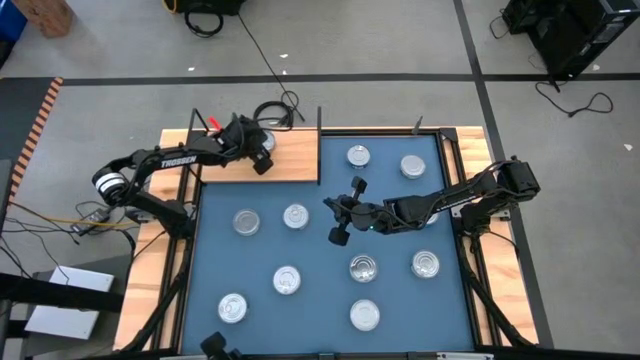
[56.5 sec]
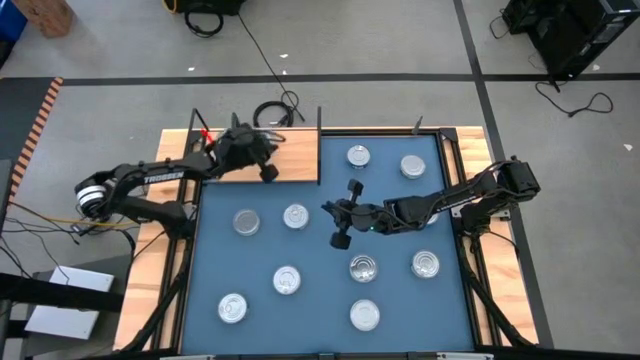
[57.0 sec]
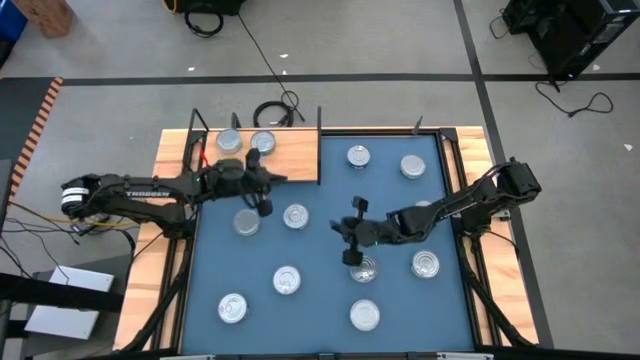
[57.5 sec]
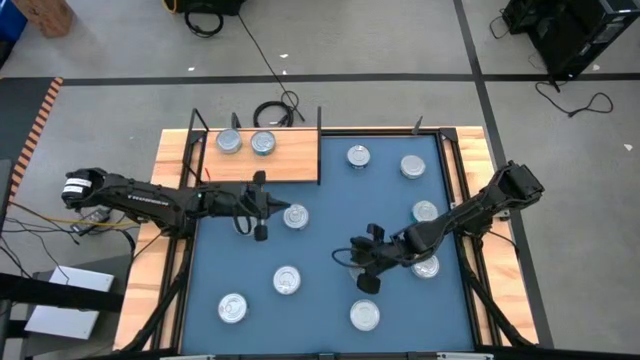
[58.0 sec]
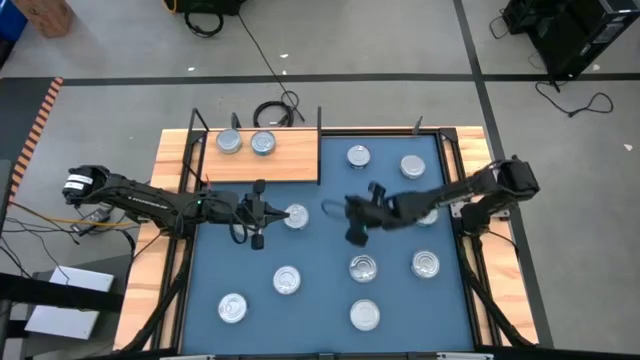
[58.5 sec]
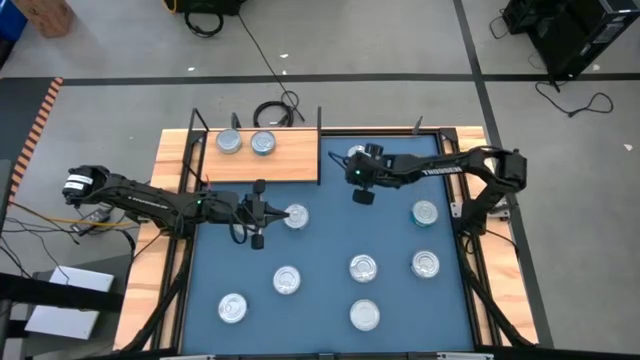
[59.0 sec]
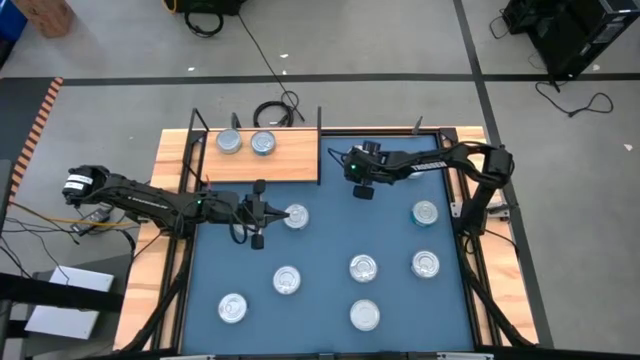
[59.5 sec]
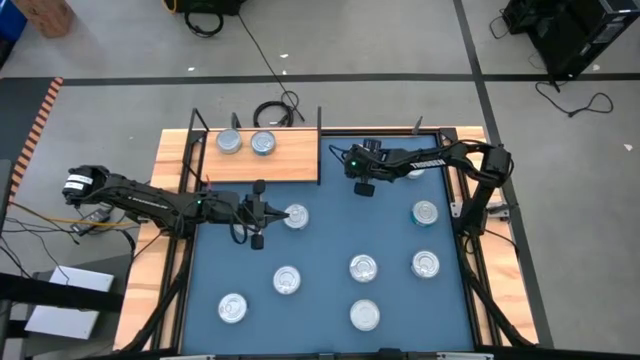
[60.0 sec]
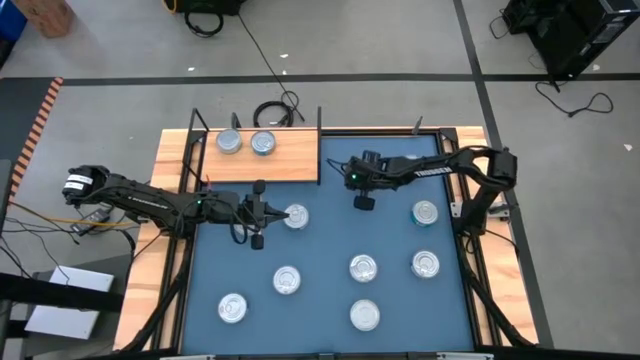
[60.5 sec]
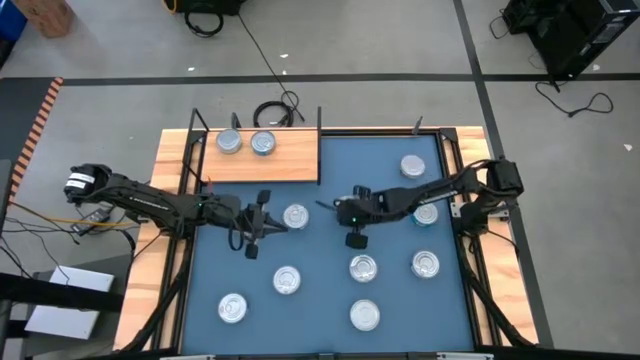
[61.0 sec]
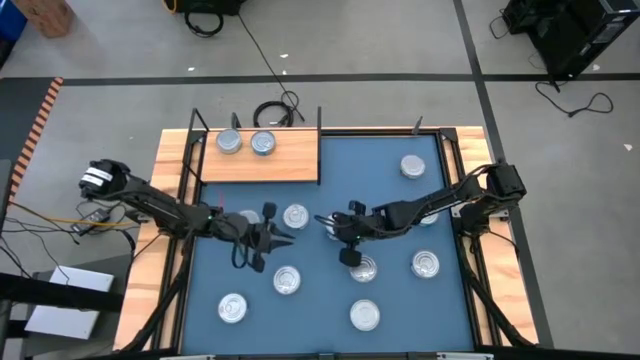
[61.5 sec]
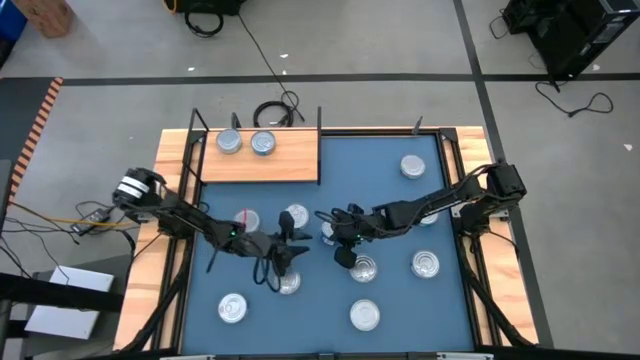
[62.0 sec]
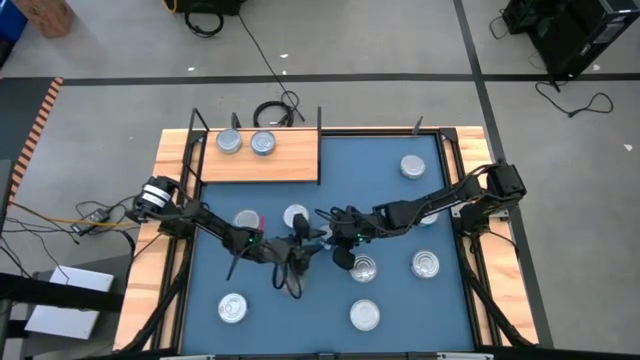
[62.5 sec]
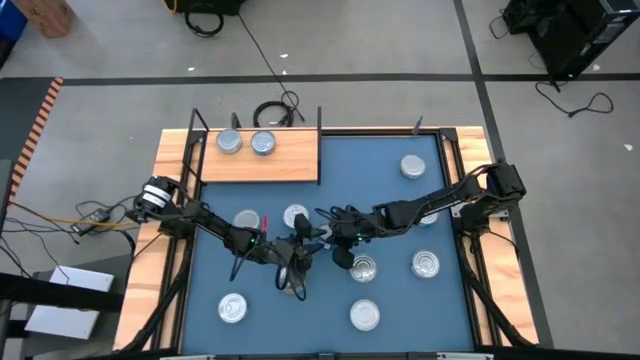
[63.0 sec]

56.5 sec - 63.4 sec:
Task: Stack canned seafood by type on shelf
Put the blue tuna can on the shelf

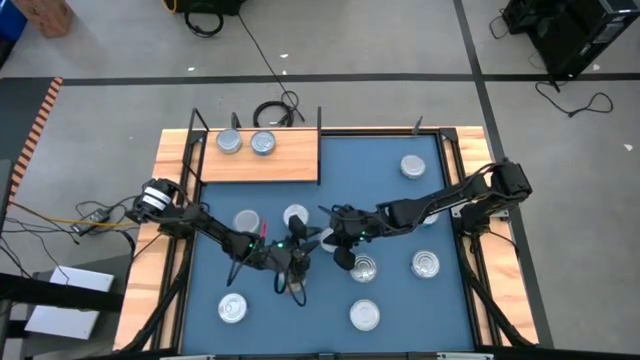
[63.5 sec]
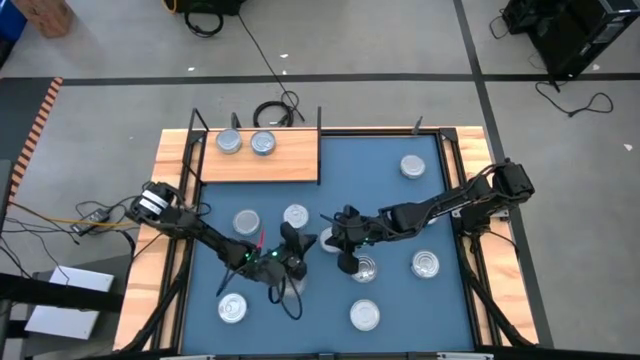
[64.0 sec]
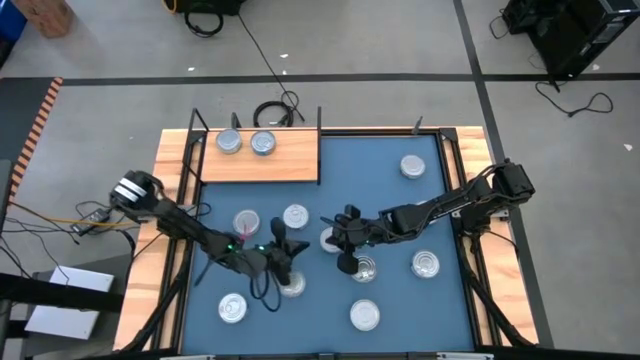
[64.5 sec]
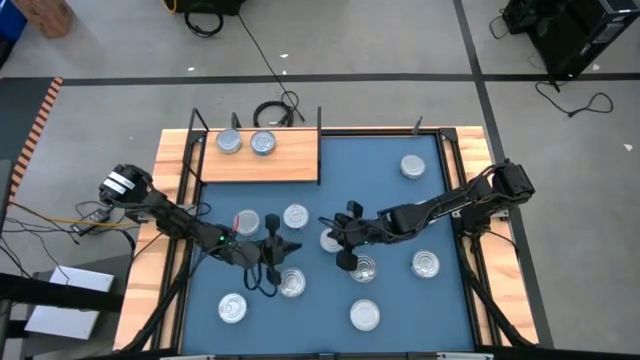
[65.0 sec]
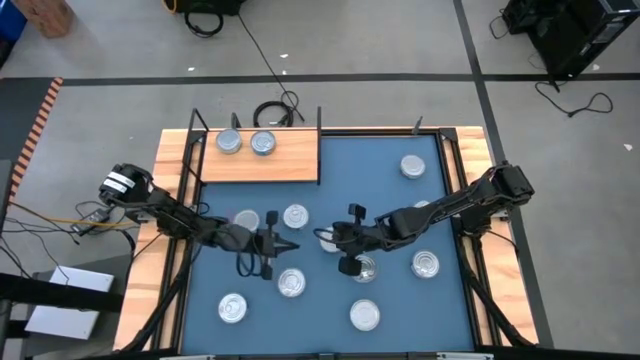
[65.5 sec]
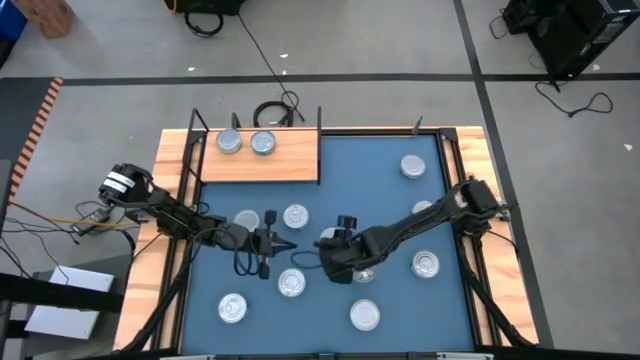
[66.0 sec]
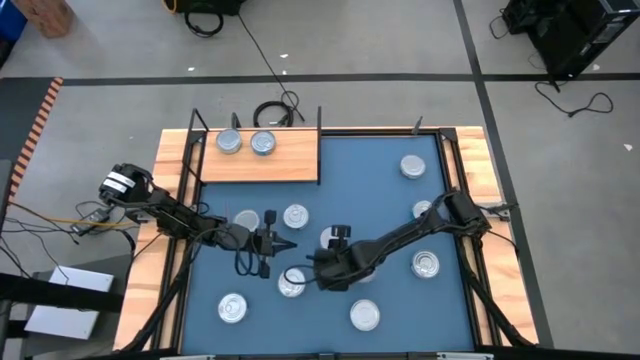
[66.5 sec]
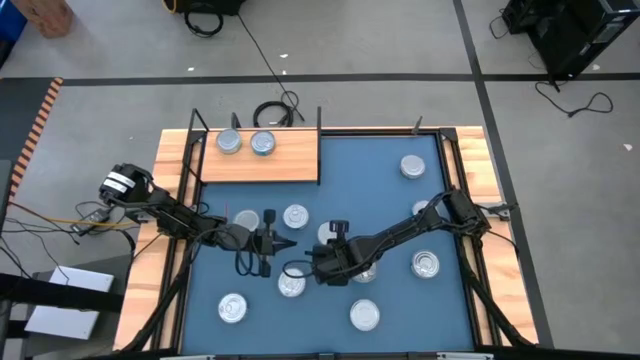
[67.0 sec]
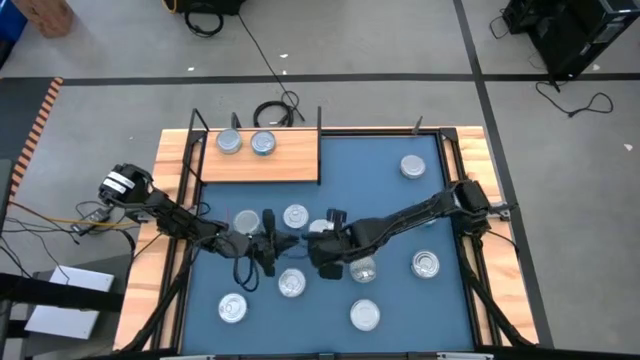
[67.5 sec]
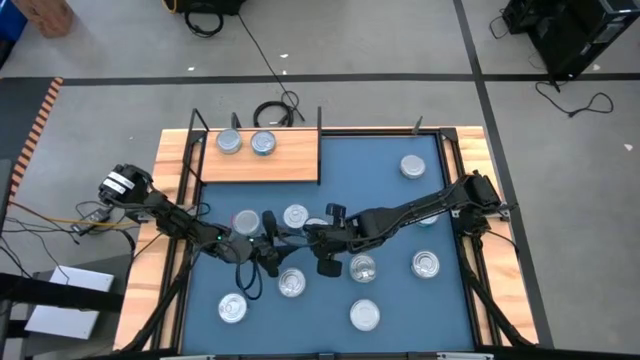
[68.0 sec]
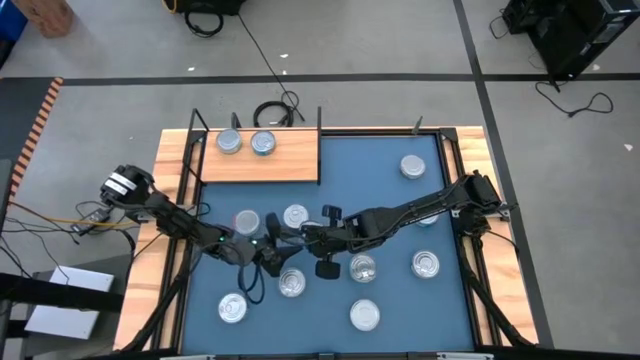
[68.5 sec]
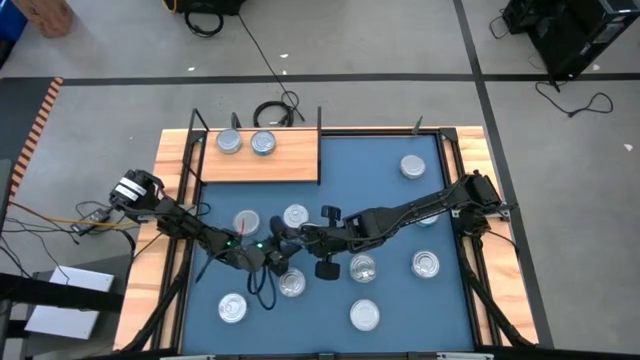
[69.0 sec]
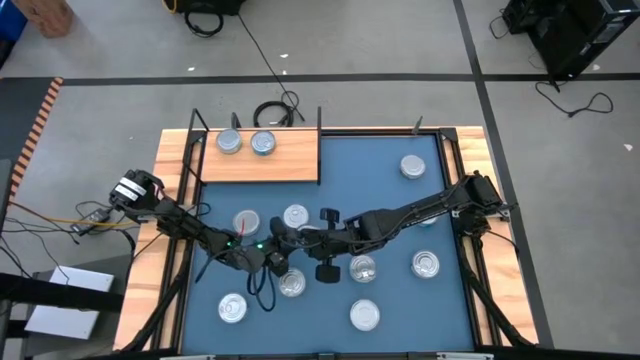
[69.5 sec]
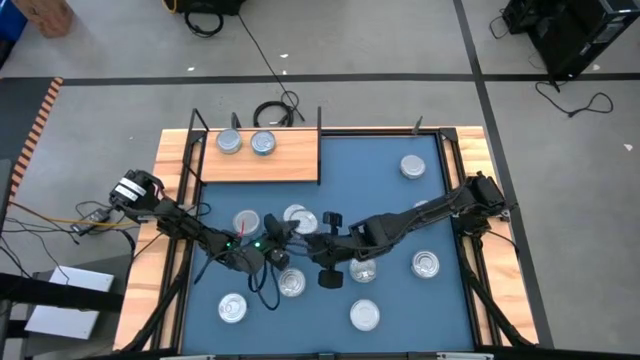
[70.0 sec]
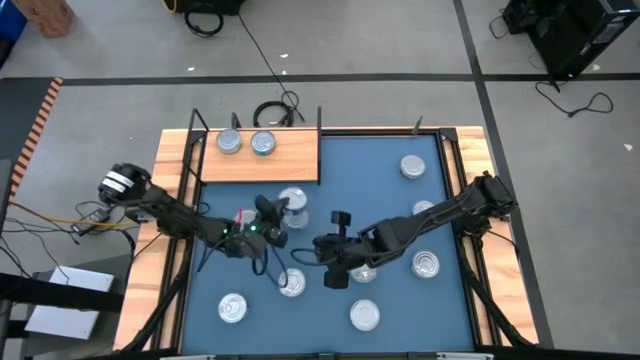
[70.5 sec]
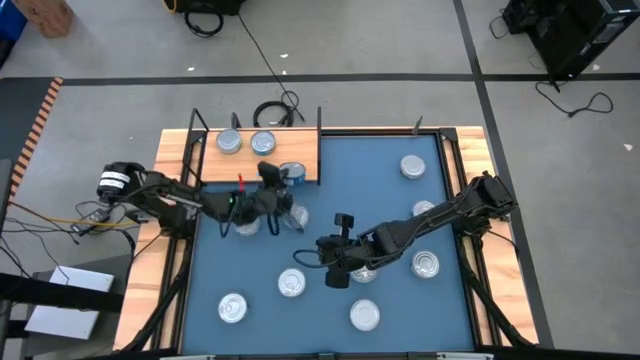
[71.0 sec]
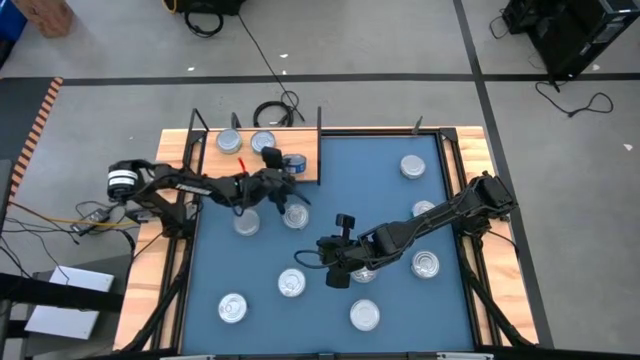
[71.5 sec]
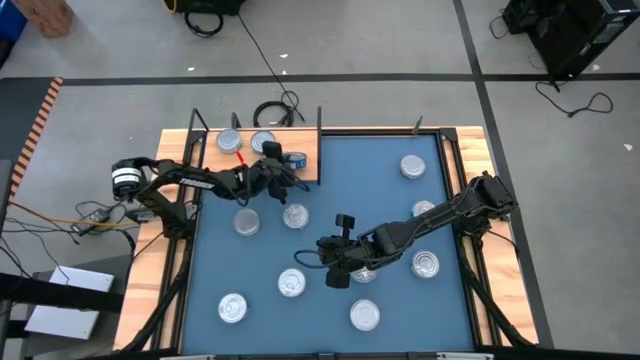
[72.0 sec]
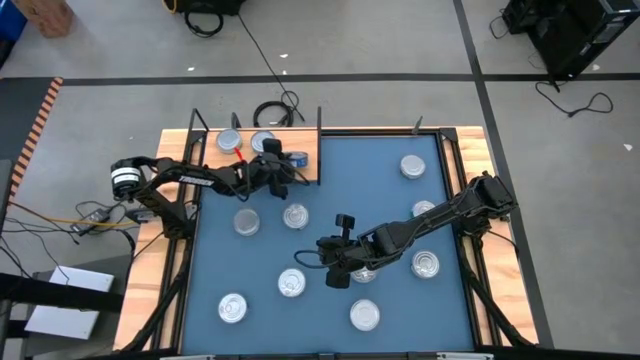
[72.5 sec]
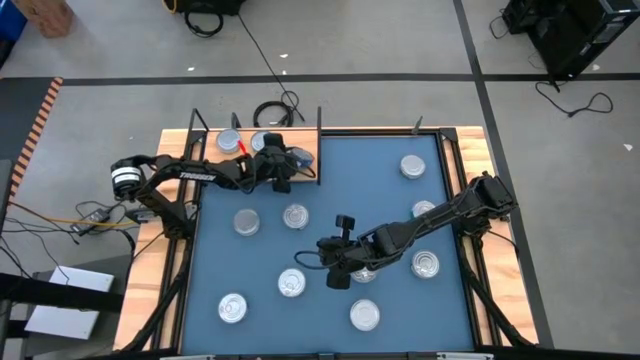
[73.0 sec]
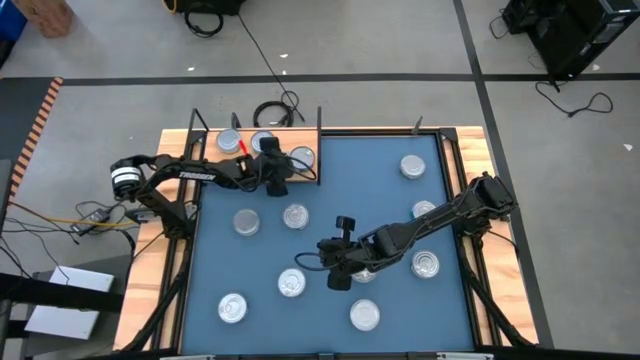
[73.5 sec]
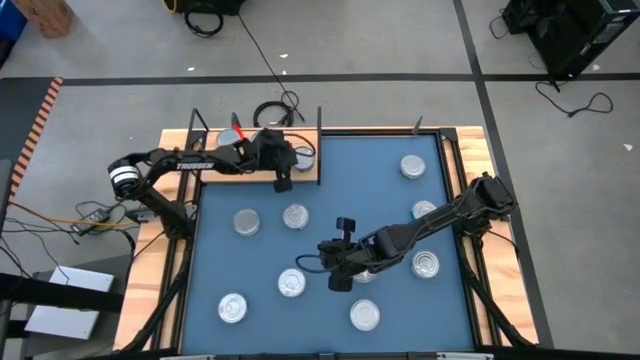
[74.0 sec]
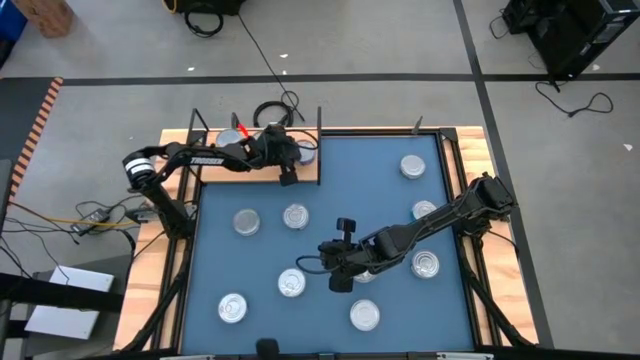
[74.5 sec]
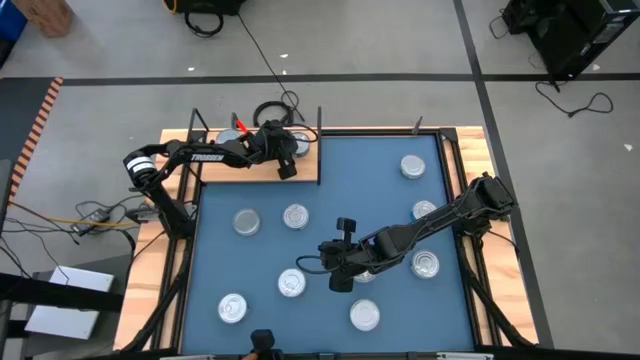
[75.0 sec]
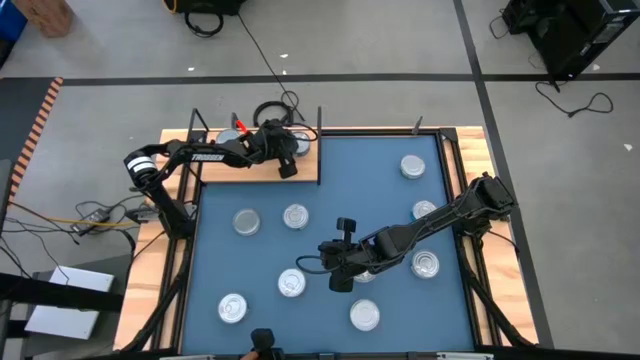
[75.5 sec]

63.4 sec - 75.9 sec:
Put the blue tuna can on the shelf
